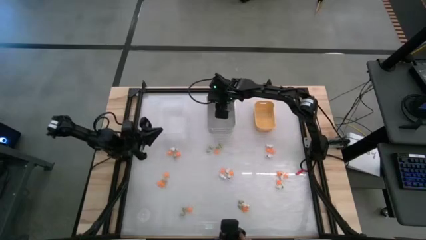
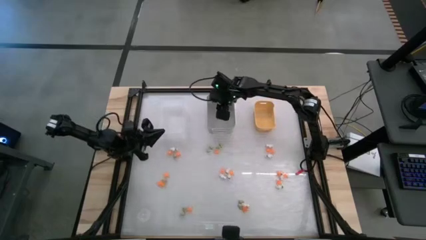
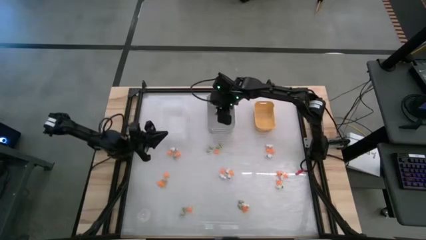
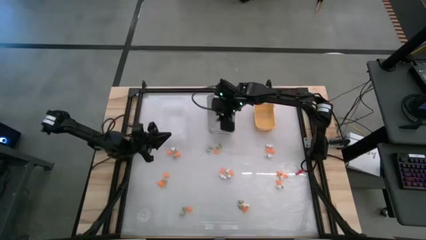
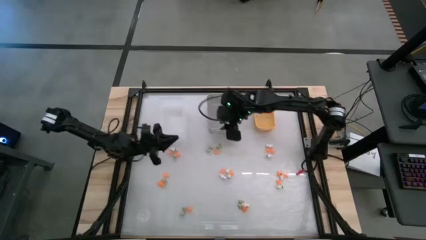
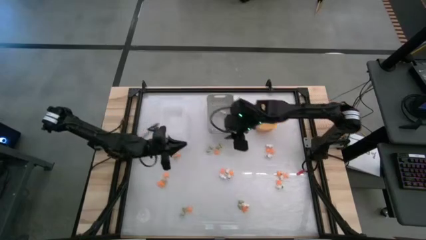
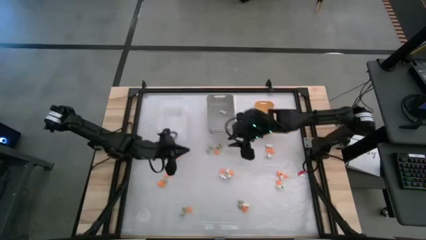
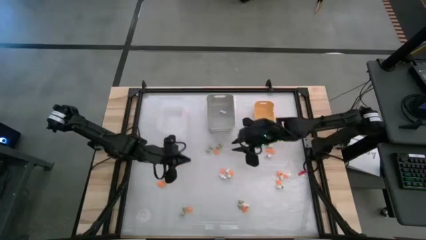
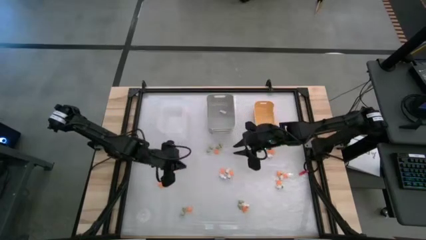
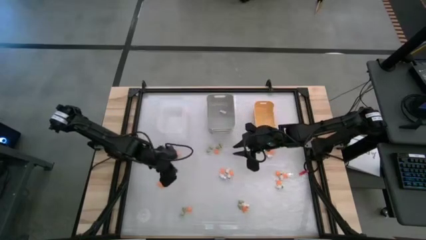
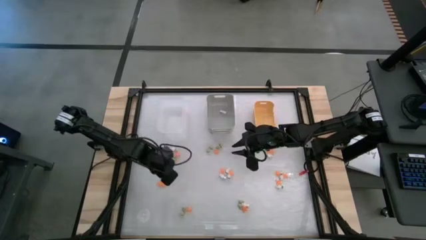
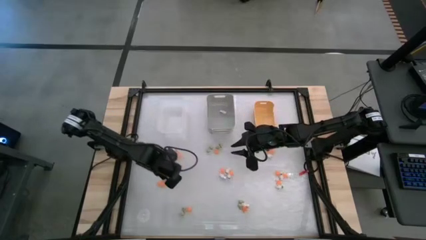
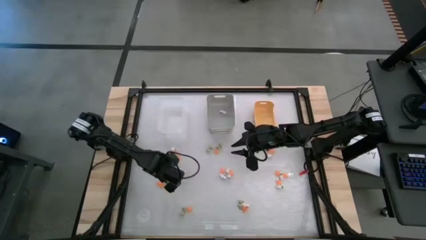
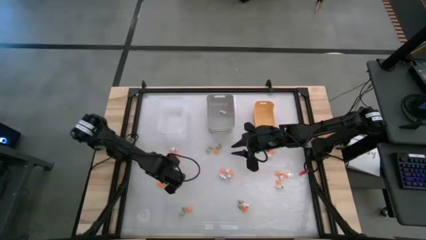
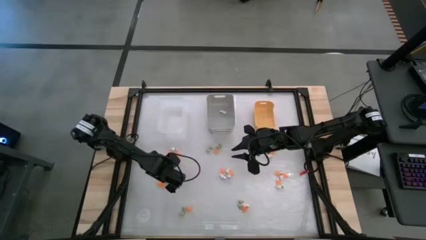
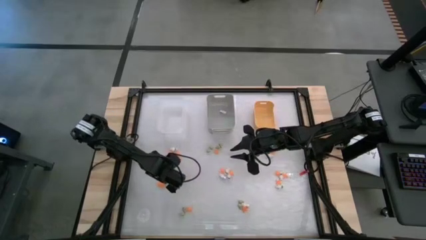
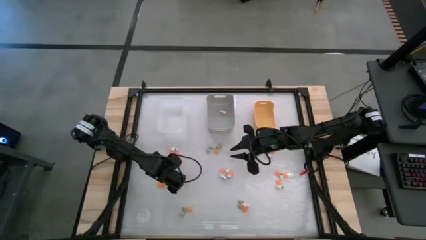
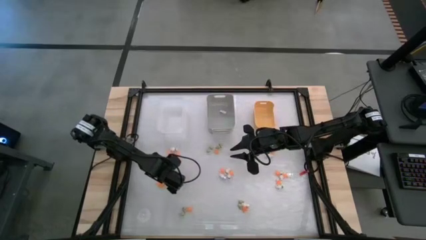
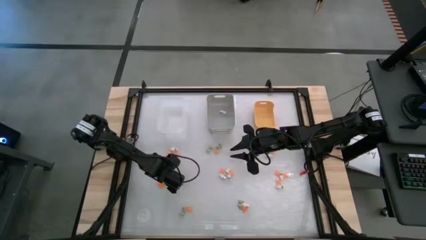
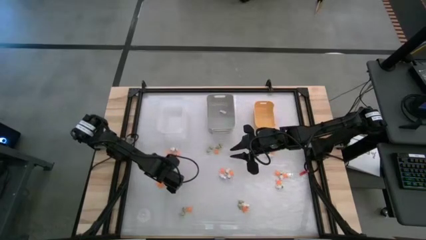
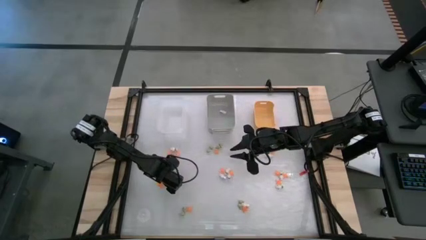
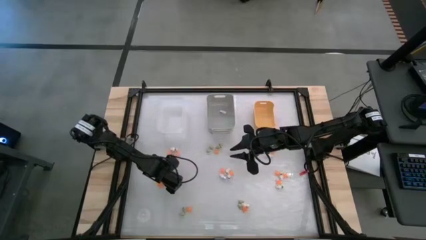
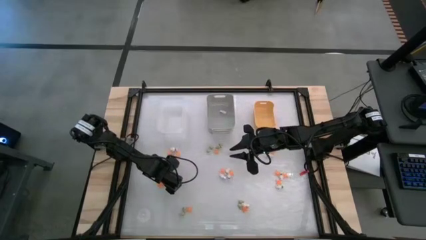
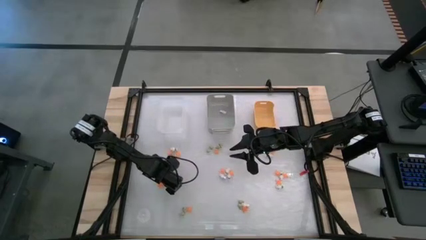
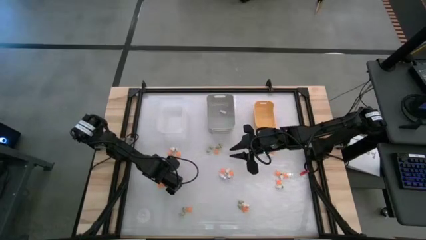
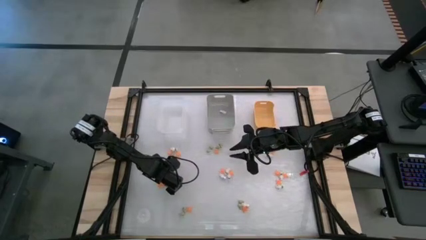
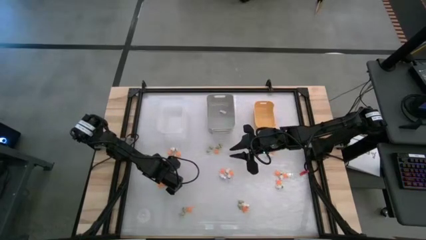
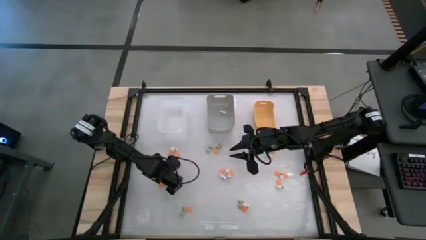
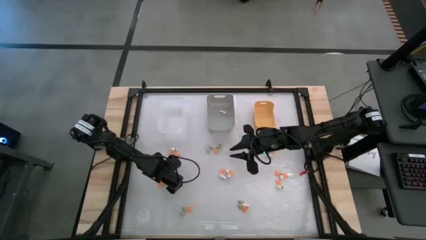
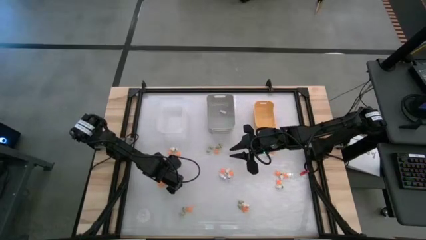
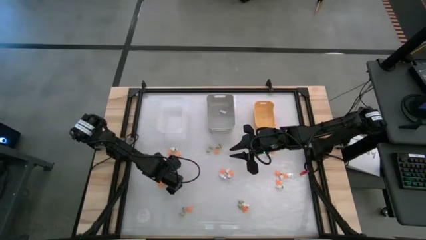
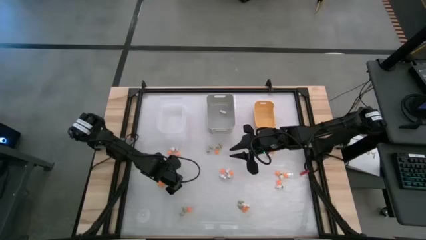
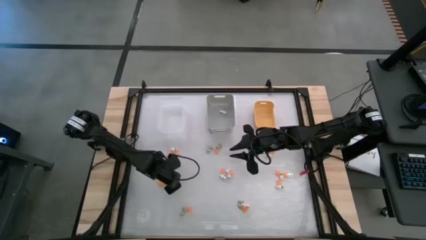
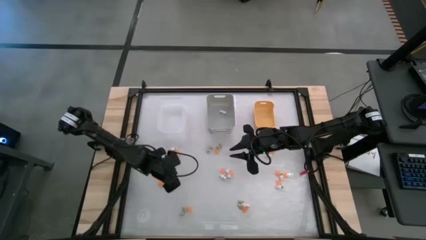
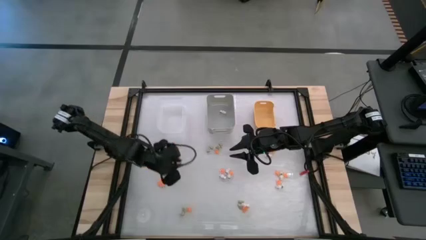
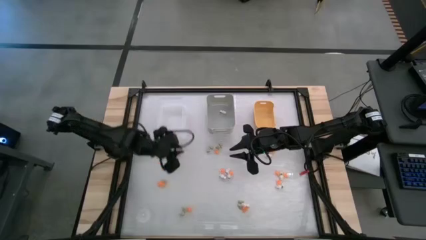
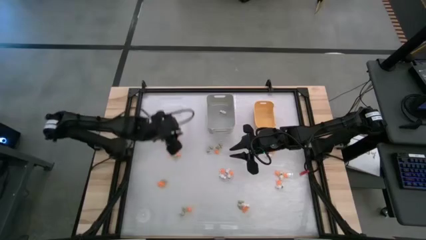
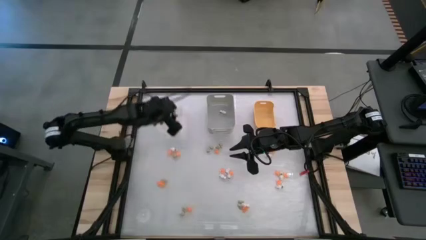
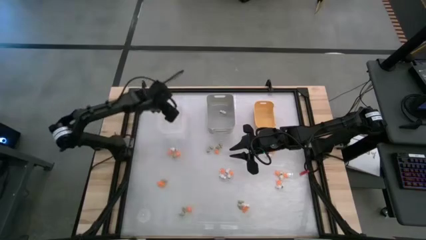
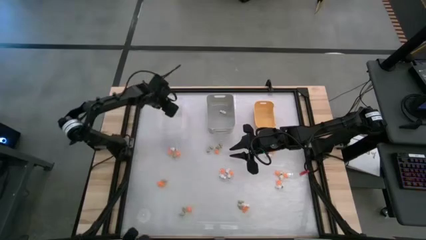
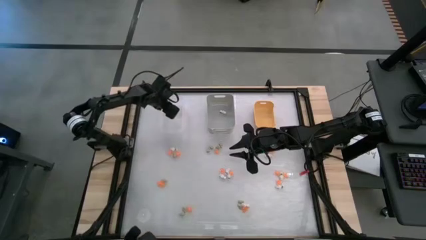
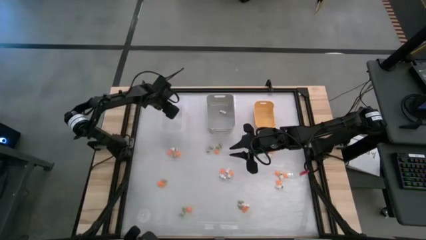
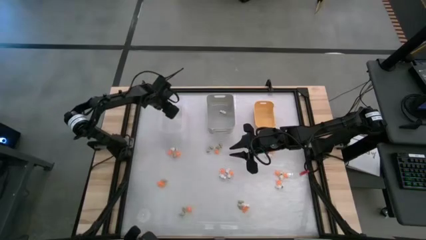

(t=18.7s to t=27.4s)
Task: Sort Halloween decoration
Put the orange spider toy into the transparent white bin

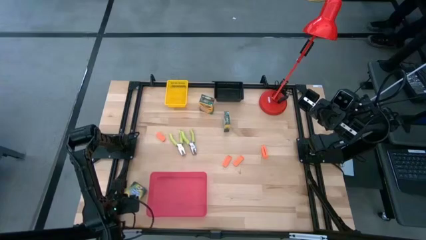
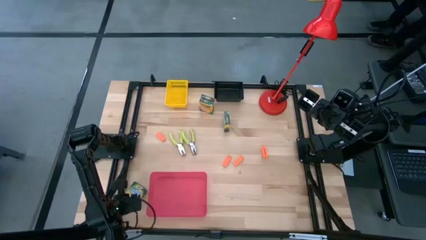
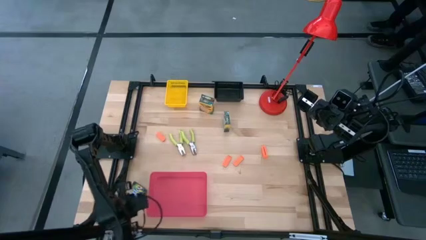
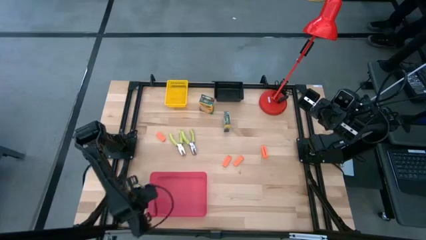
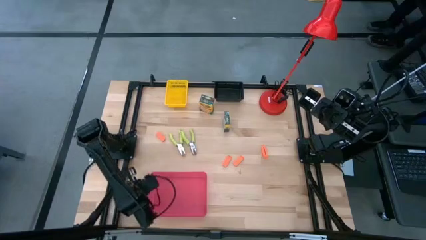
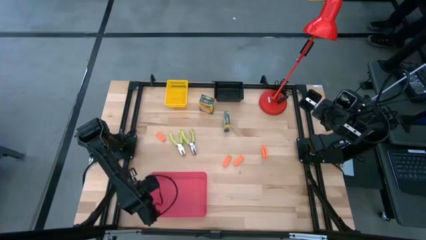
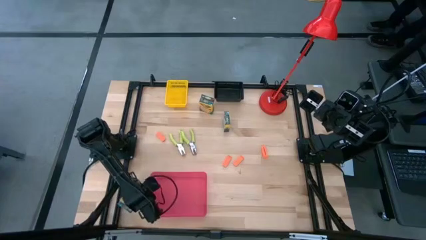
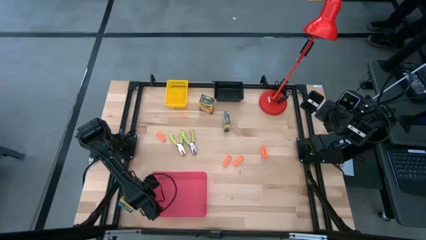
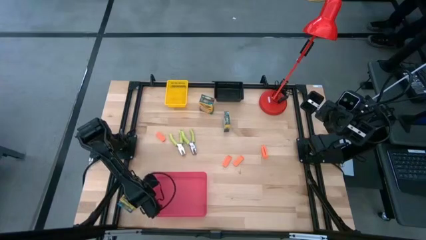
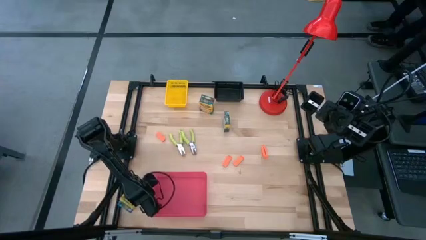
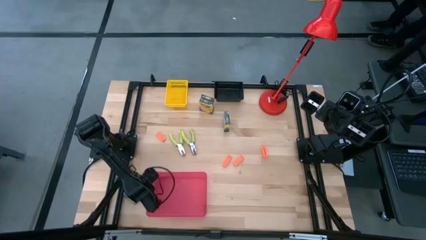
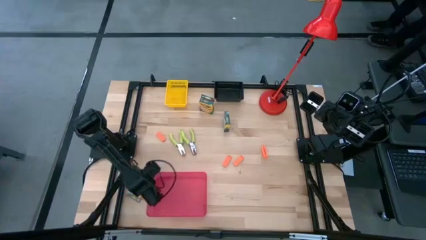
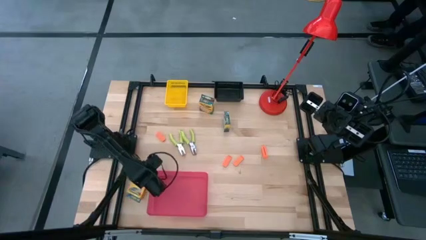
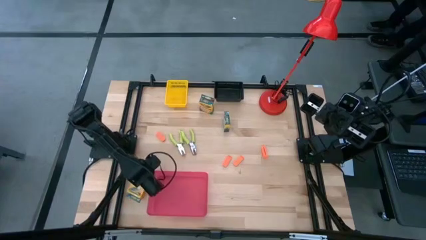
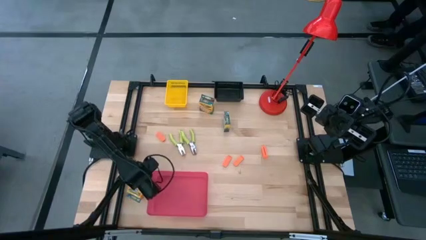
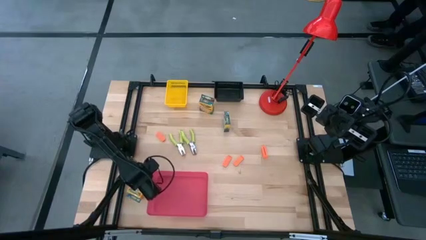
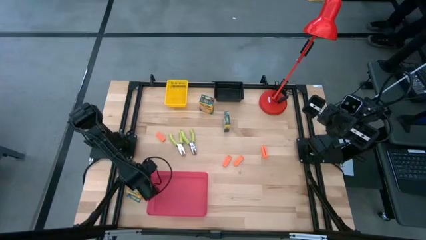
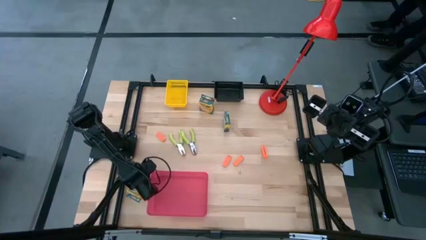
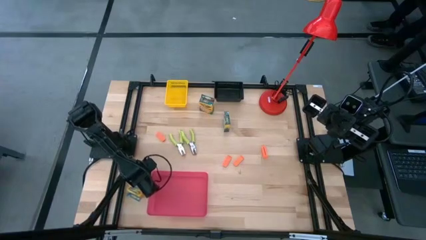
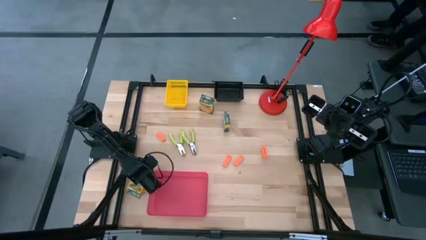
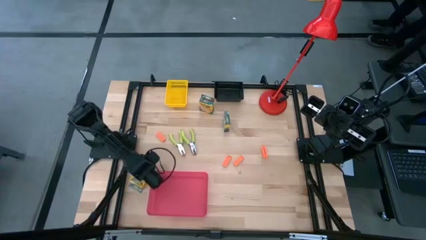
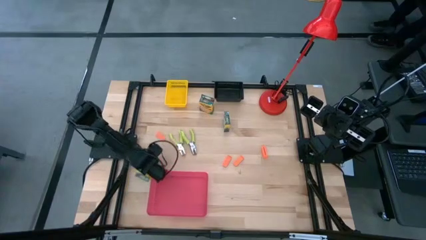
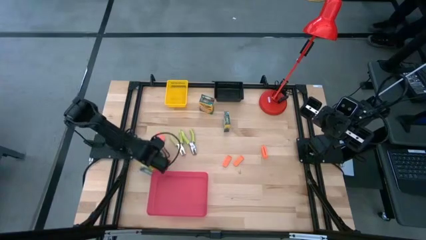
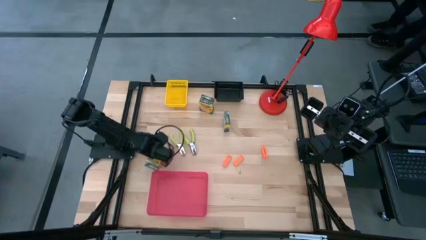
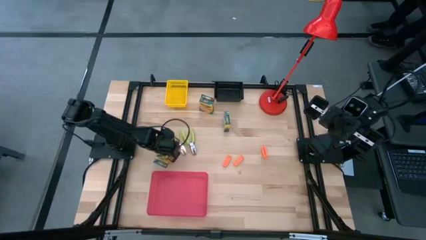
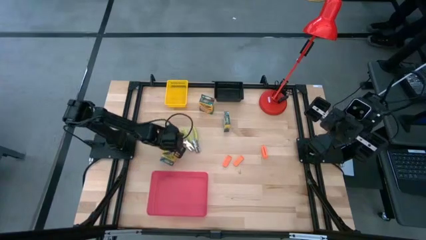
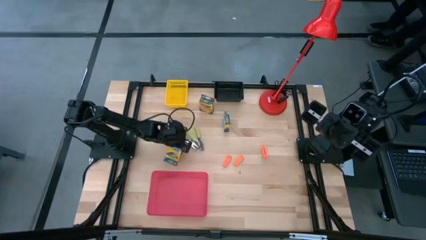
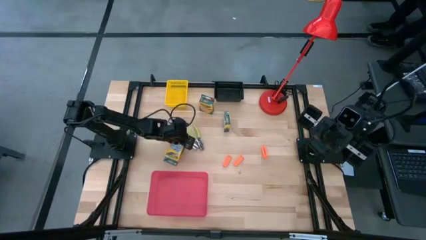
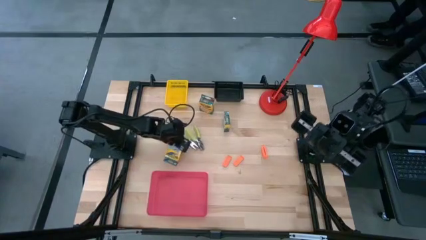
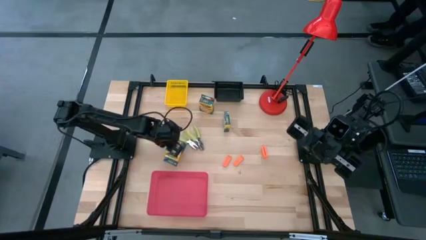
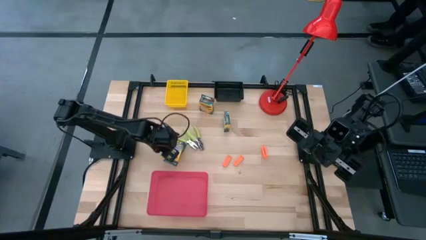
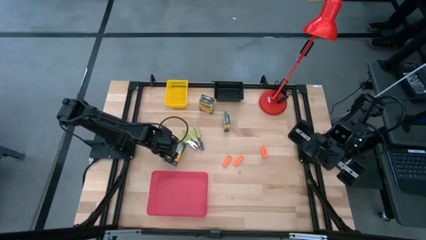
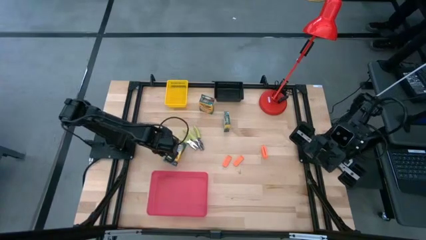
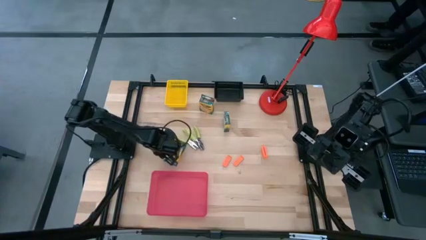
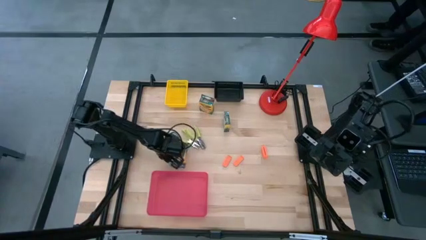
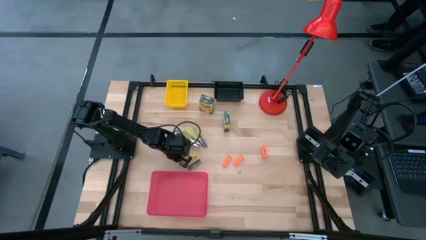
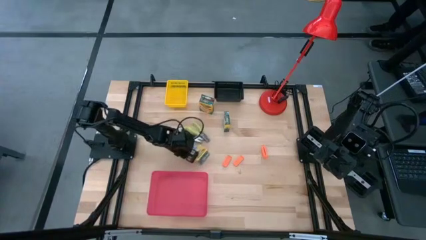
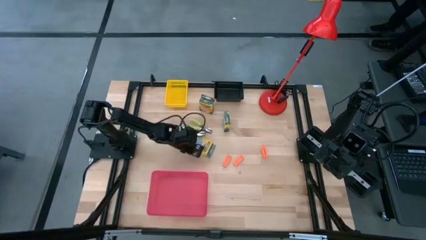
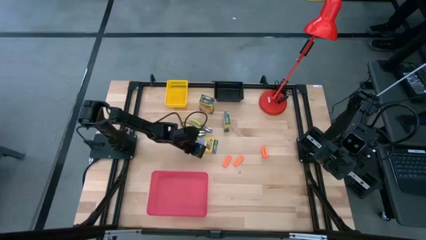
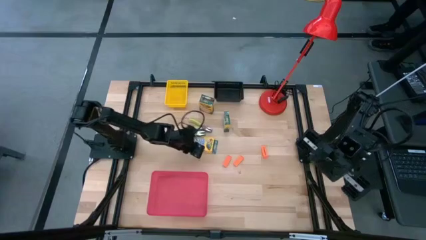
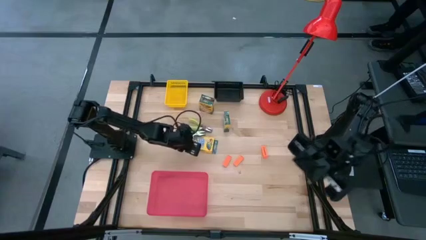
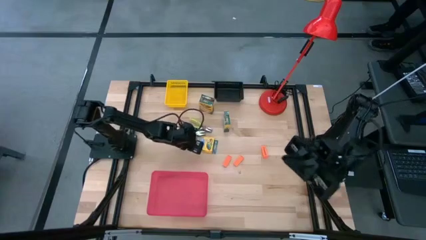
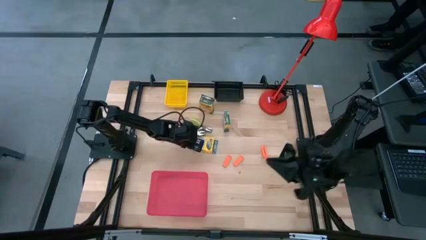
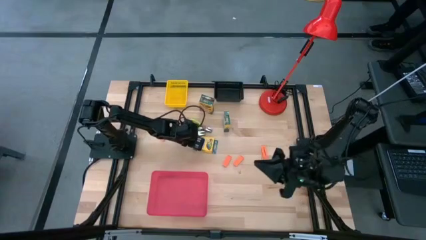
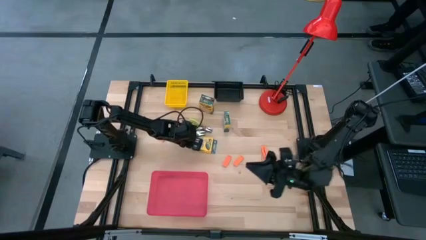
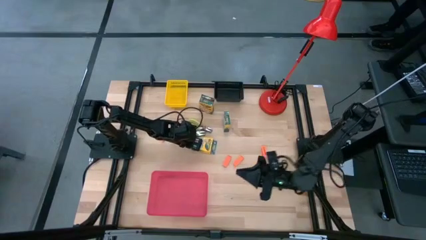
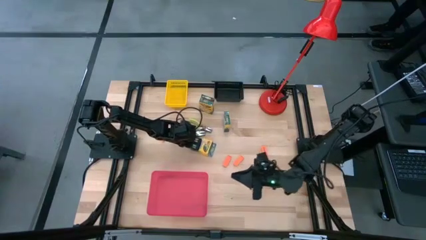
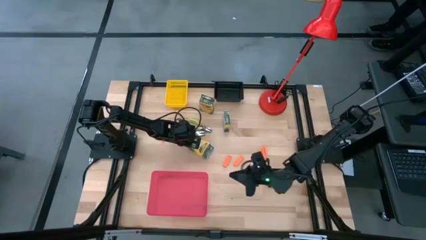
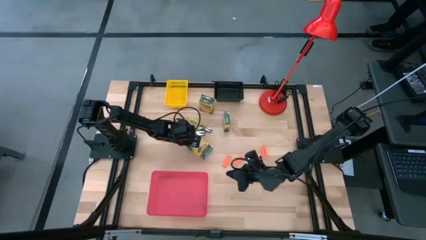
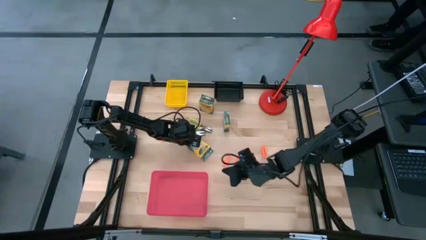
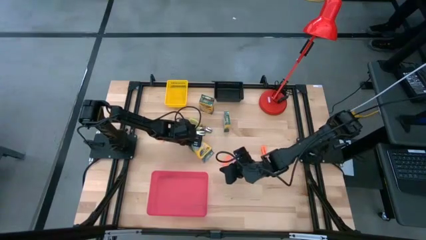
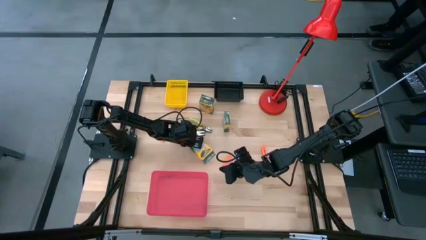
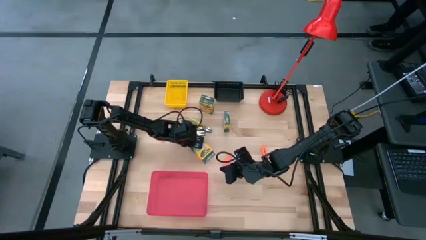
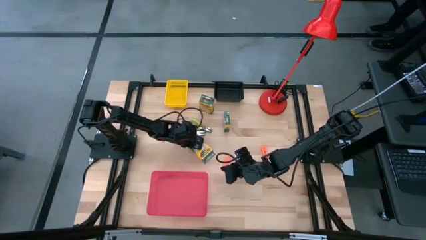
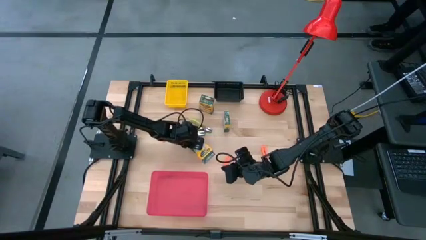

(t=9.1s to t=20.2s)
Task: Pick & Place School Supplies
Put the yellow crayon box into the red bin
